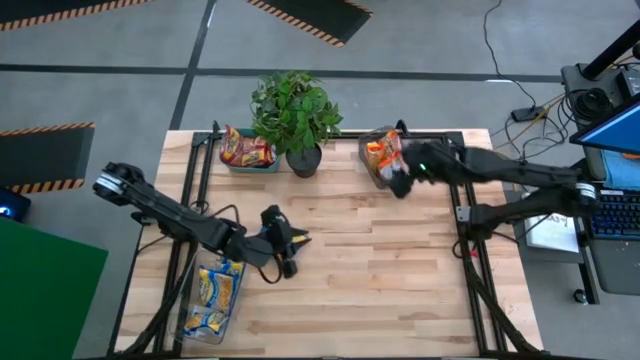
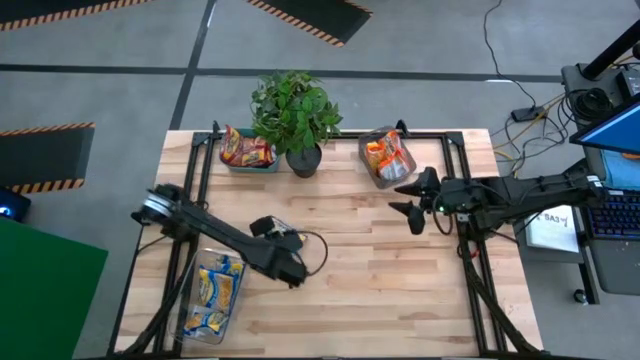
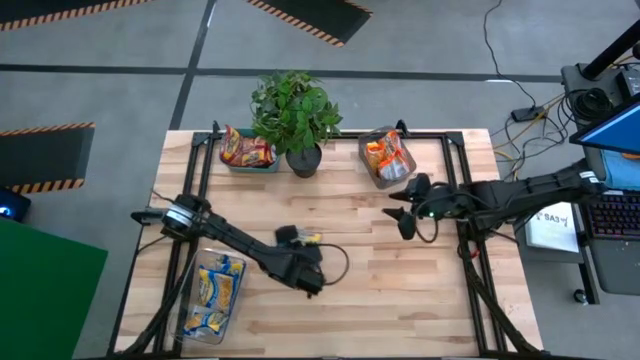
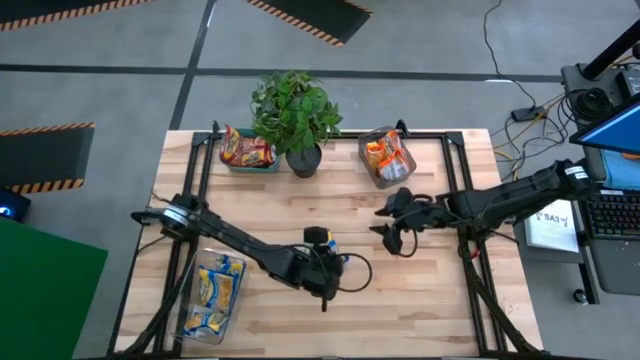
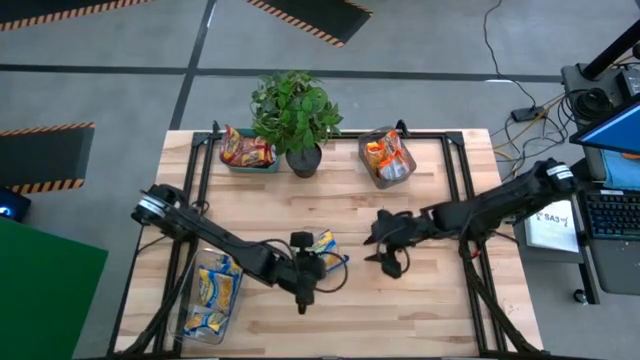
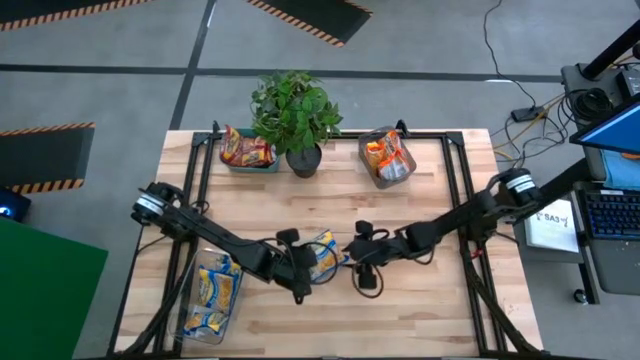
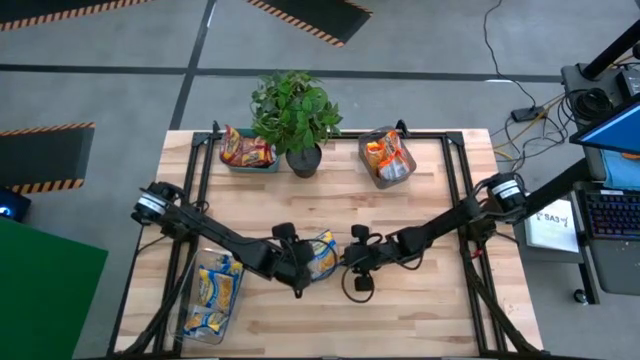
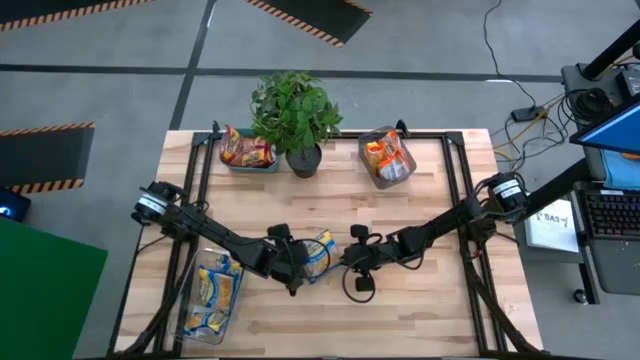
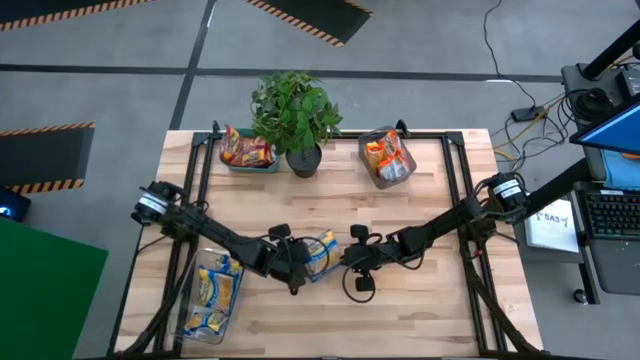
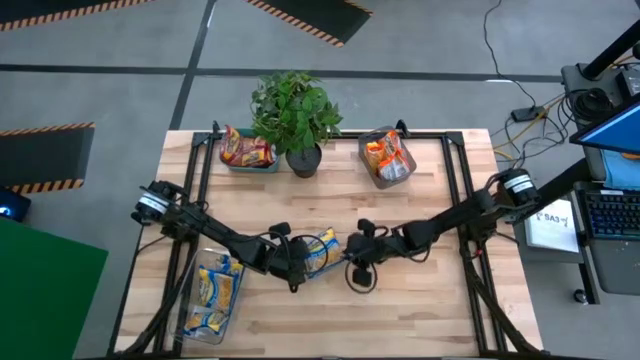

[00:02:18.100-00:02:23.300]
Task: Sort Maruchan noodles
Put the blue noodle pack into the transparent bin

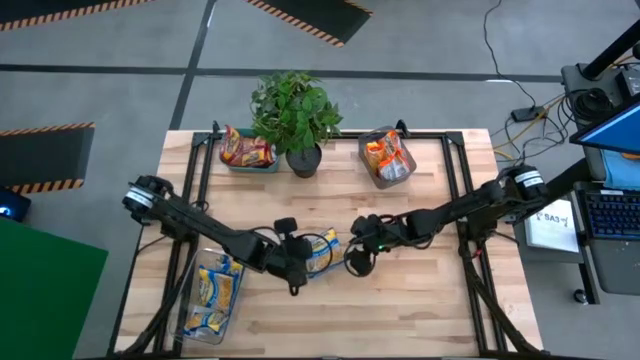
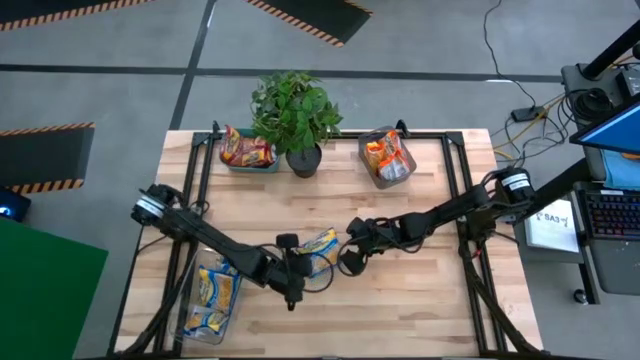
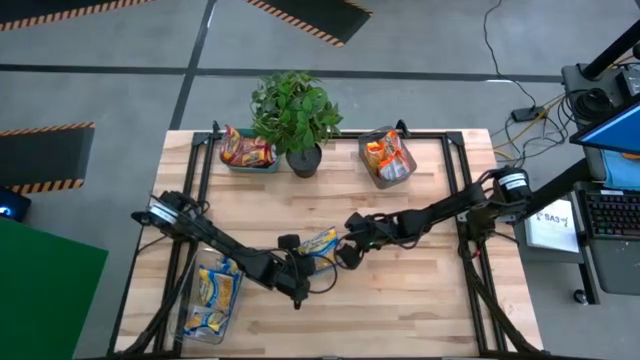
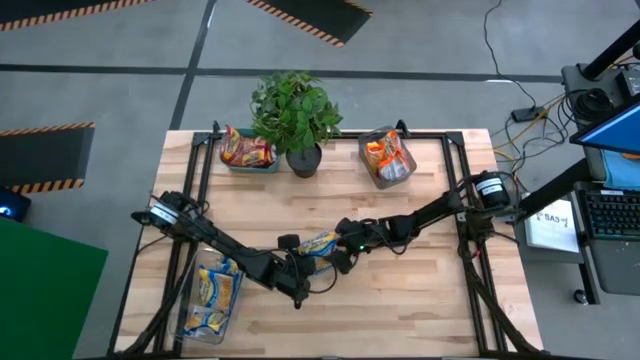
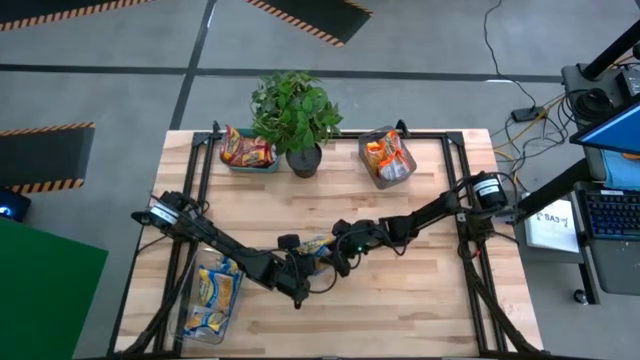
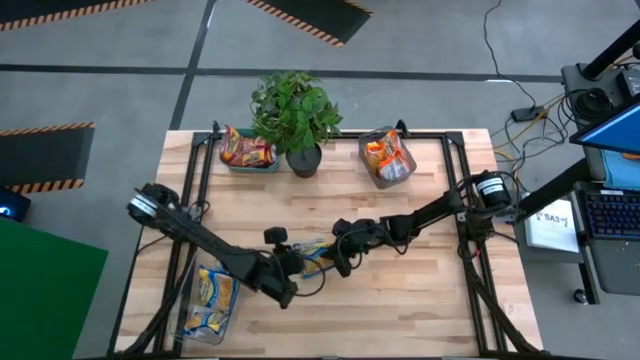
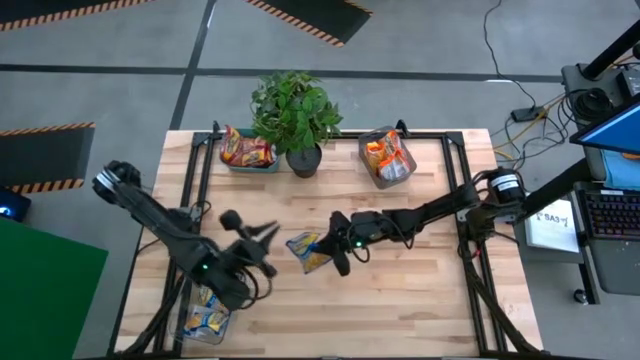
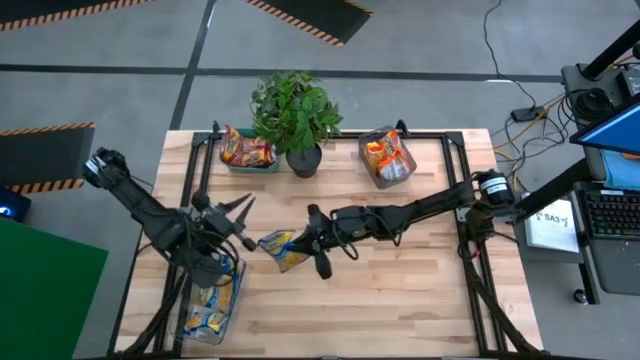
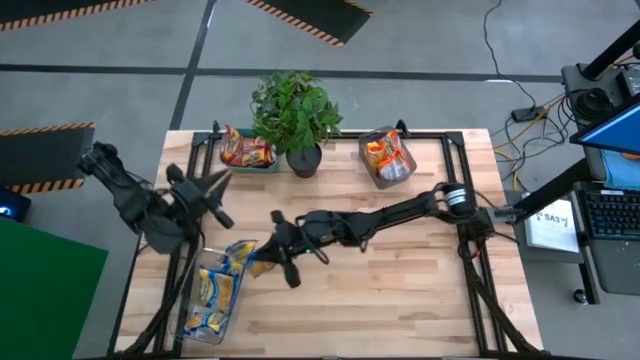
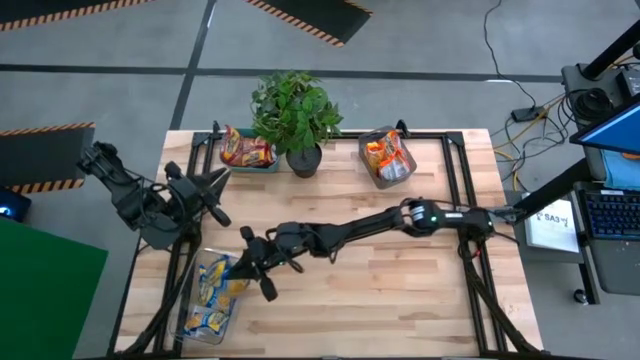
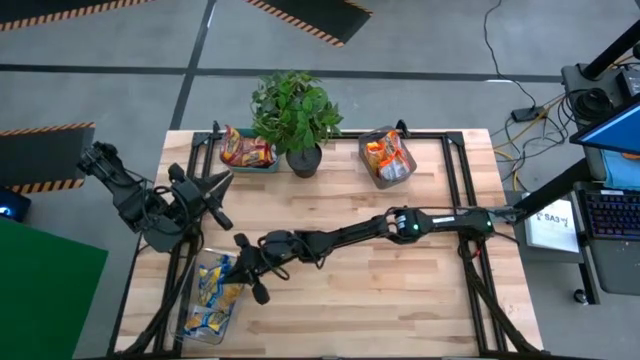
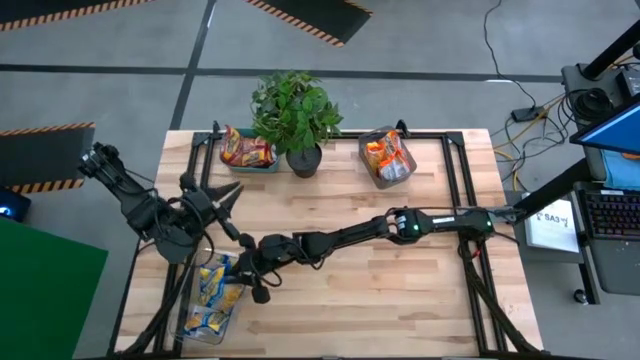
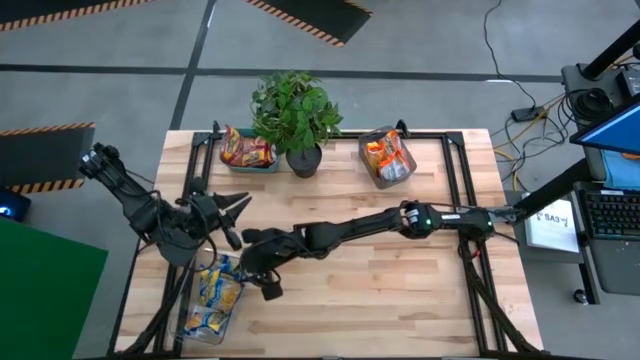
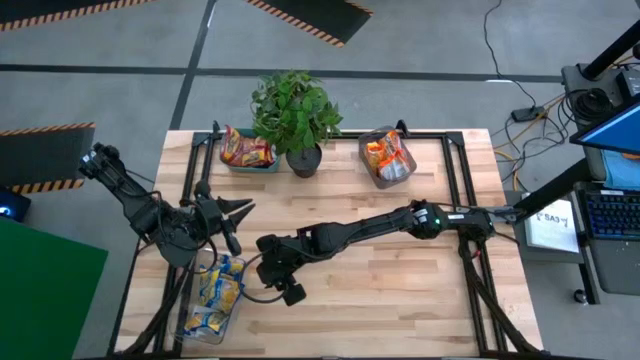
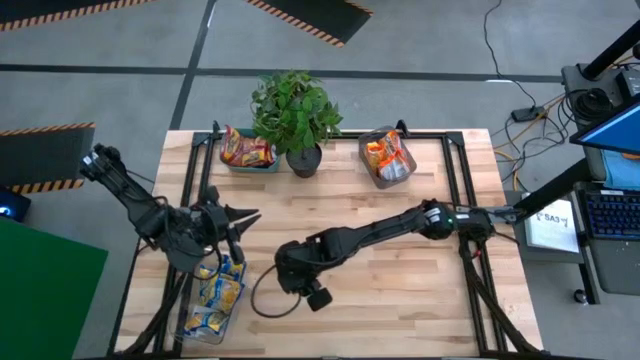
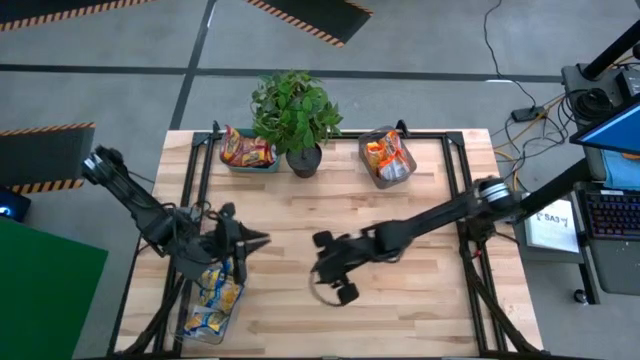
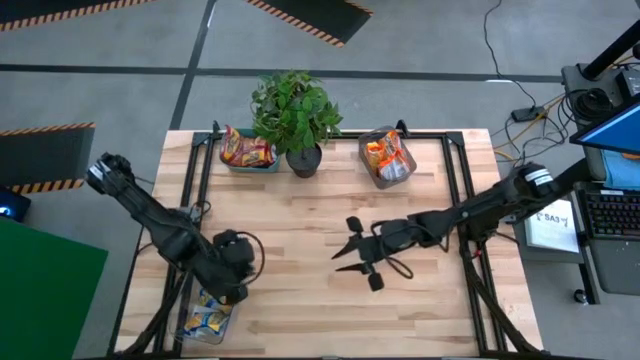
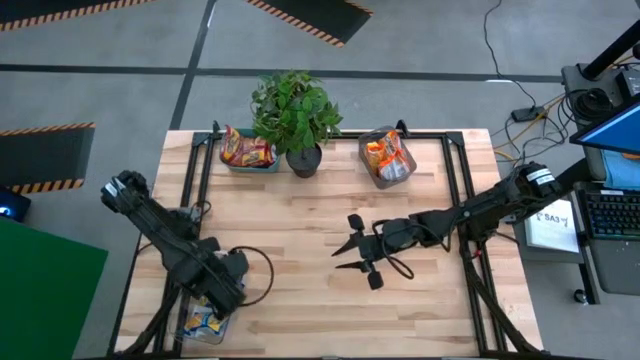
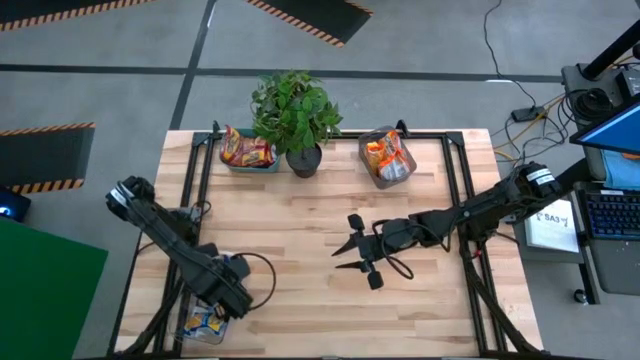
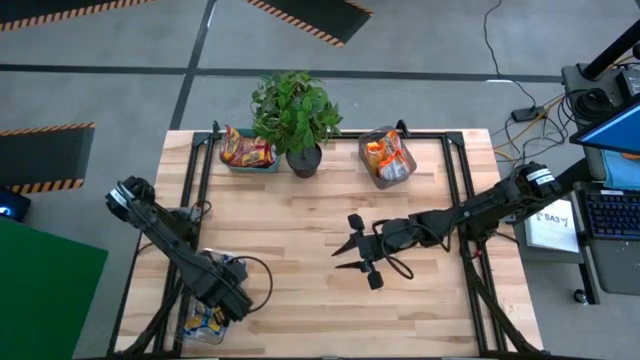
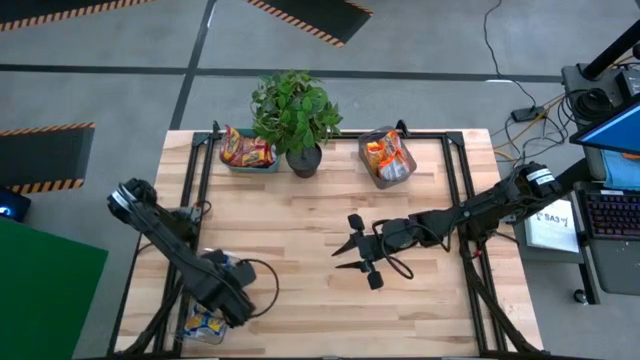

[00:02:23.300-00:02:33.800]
Put the blue noodle pack into the transparent bin
